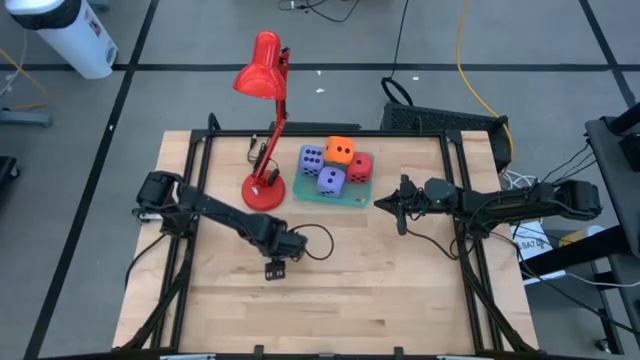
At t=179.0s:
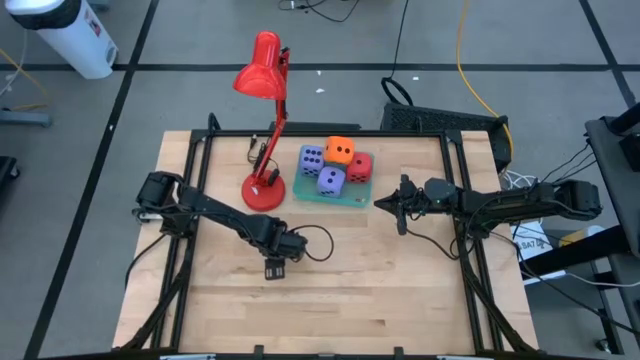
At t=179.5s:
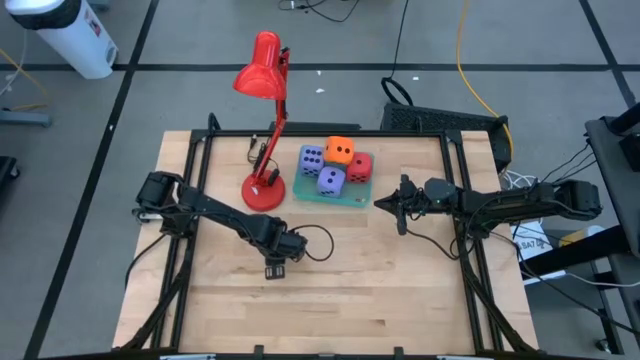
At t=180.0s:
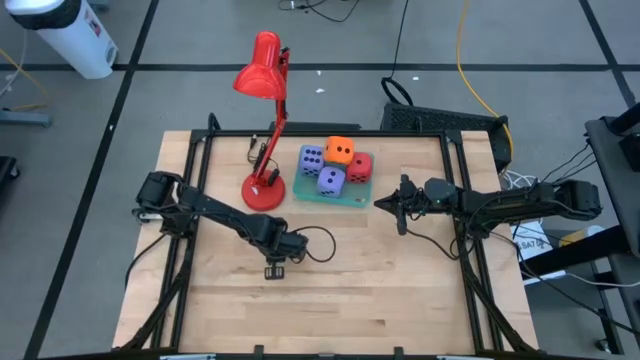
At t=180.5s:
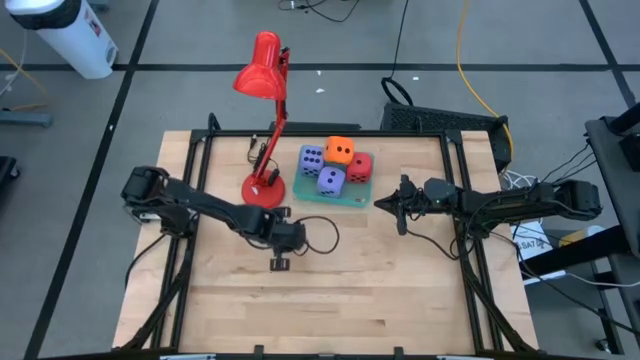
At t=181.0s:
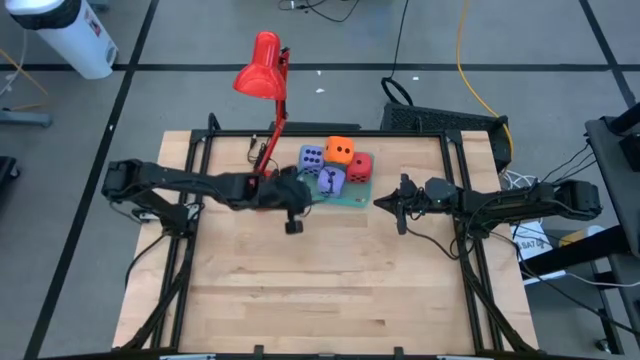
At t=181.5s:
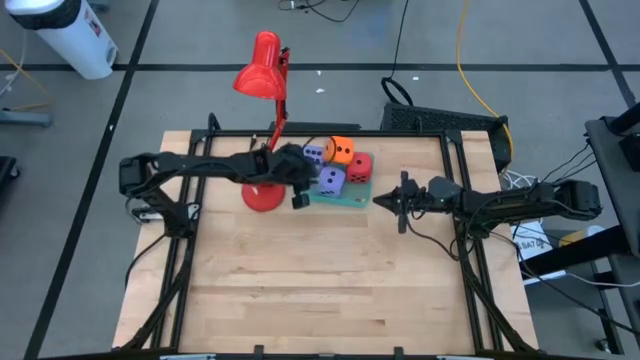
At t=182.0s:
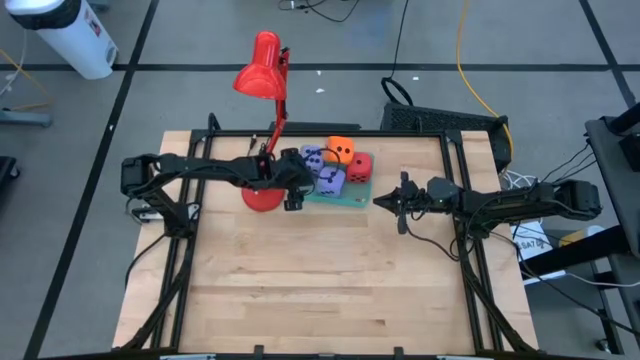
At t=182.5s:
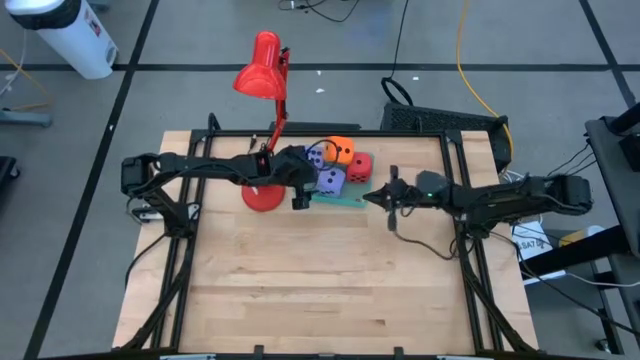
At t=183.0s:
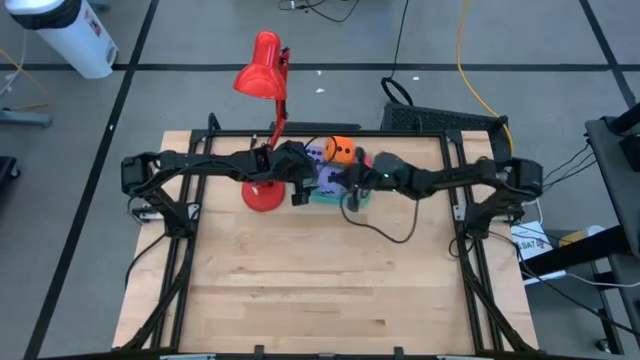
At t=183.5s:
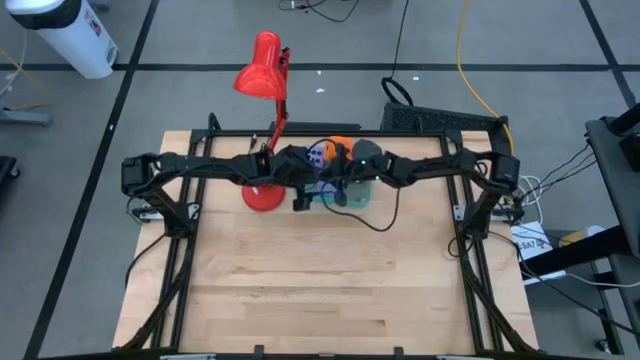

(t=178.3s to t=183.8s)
Task: Pick & Place Dice
Put the small light green die into the blue bin

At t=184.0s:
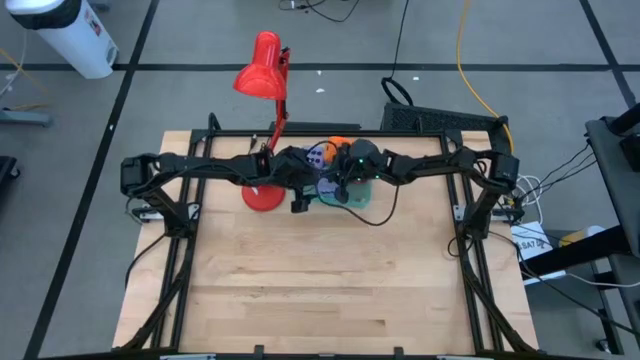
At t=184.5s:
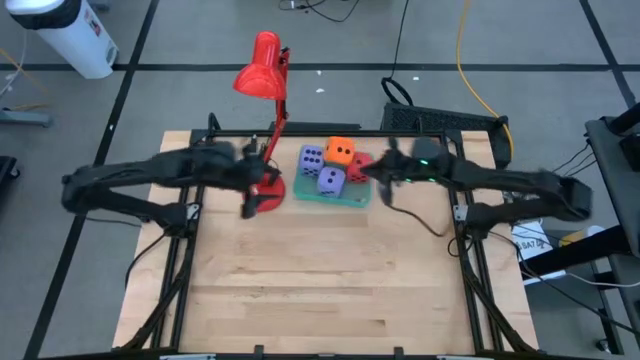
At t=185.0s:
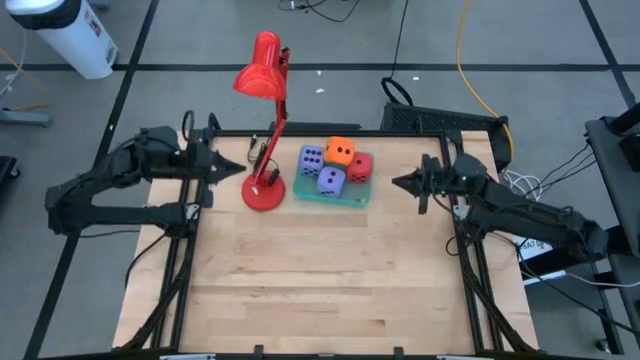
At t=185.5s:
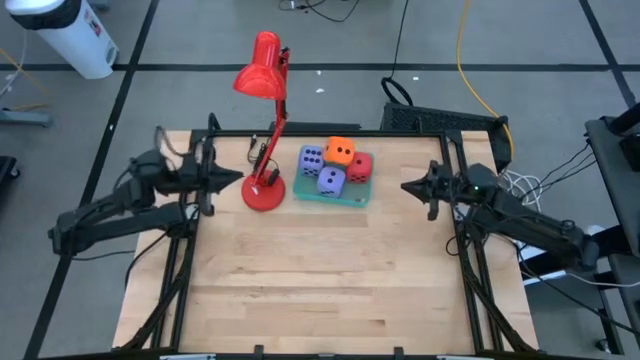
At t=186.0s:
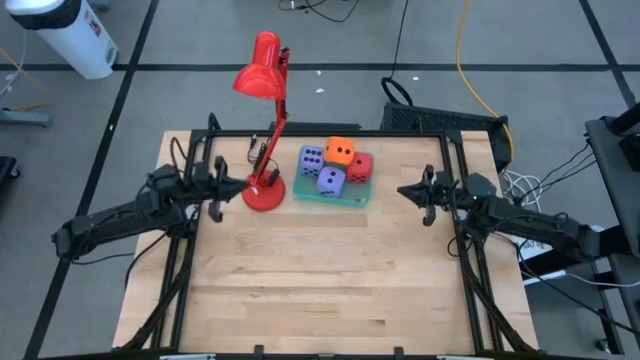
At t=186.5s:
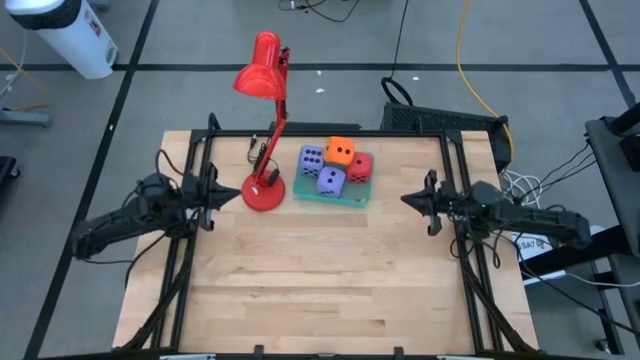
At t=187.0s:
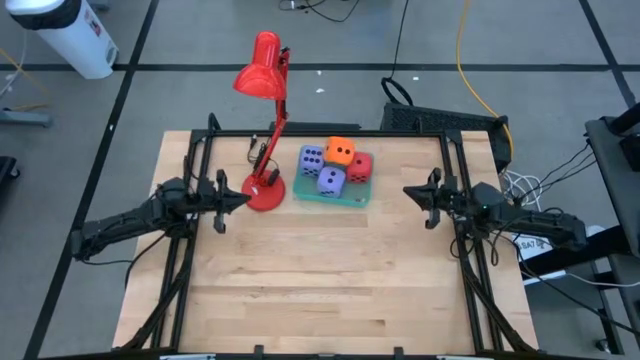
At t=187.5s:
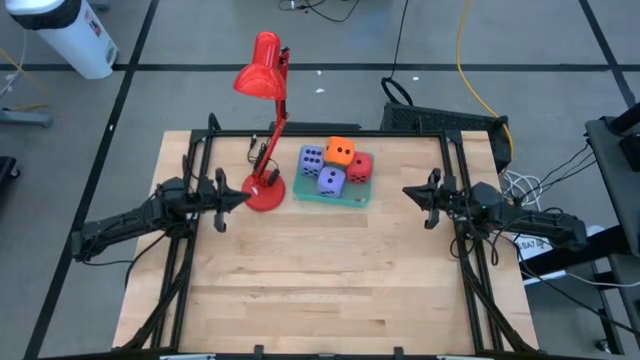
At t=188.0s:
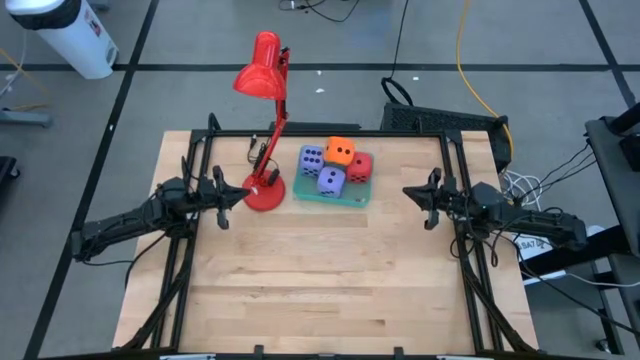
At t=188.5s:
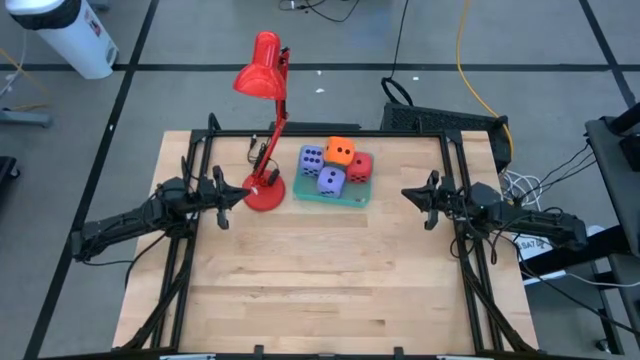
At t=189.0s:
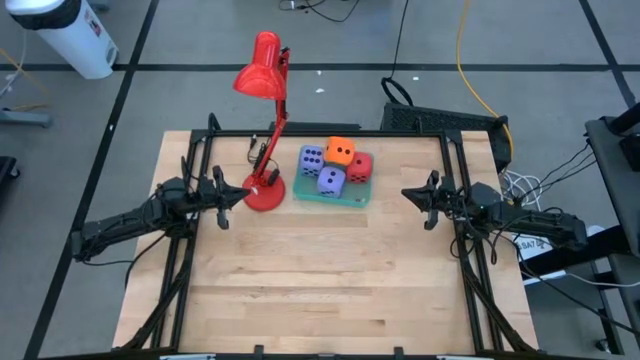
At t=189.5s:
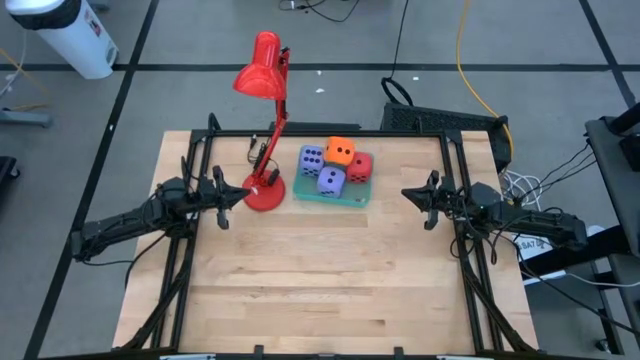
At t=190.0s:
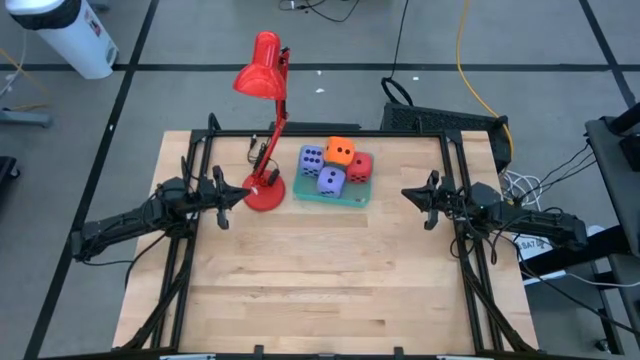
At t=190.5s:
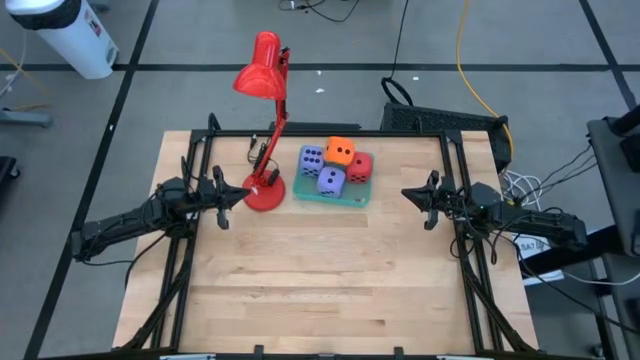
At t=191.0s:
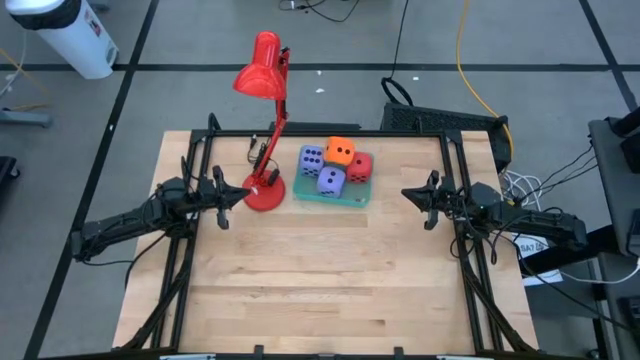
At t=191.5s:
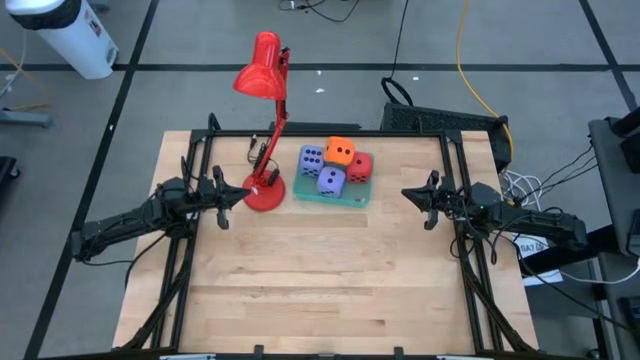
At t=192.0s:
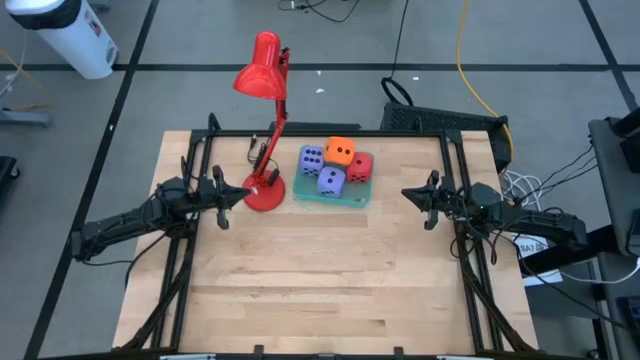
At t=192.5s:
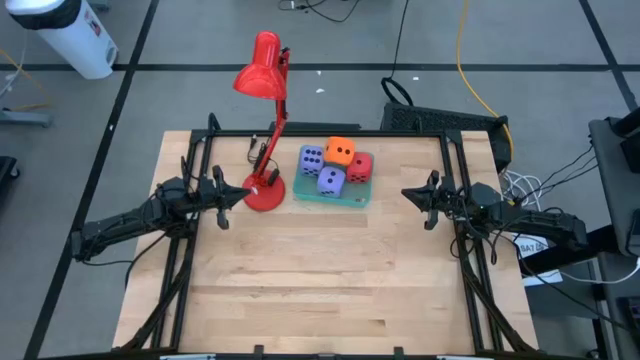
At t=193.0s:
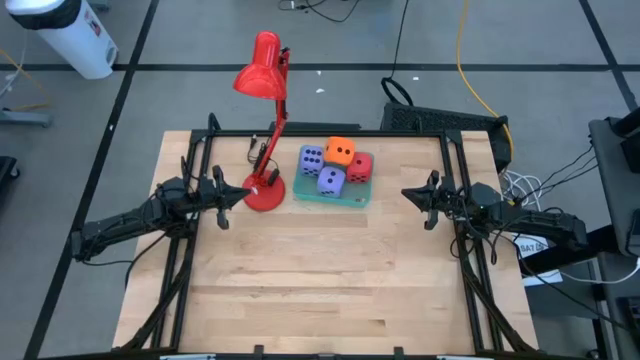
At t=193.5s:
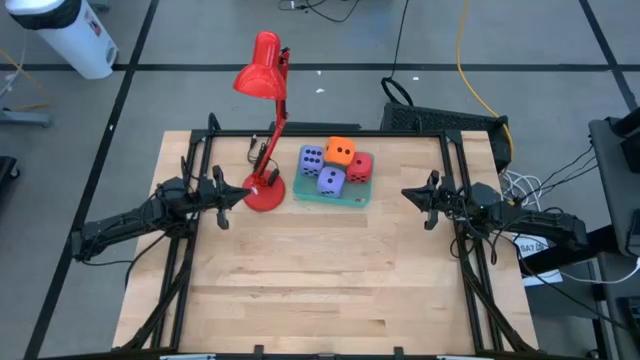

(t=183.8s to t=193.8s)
Return to Home Position

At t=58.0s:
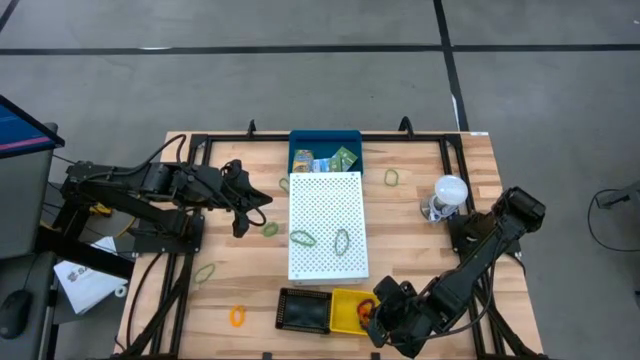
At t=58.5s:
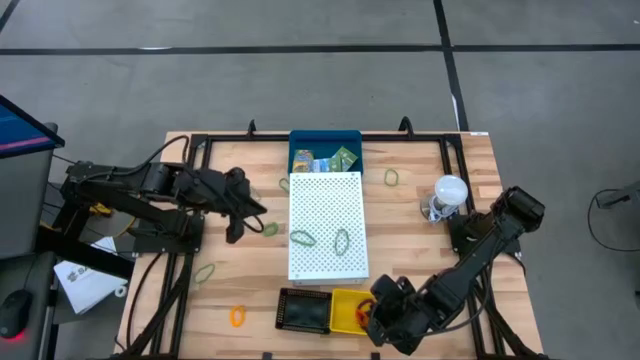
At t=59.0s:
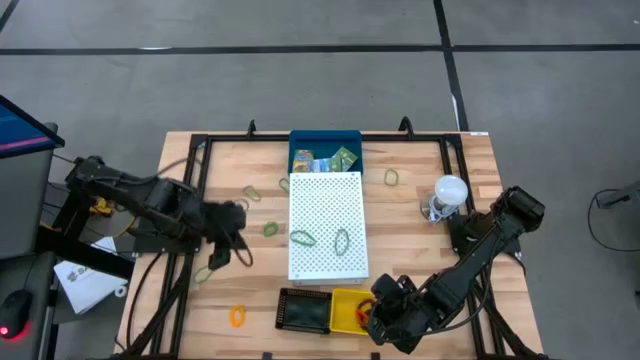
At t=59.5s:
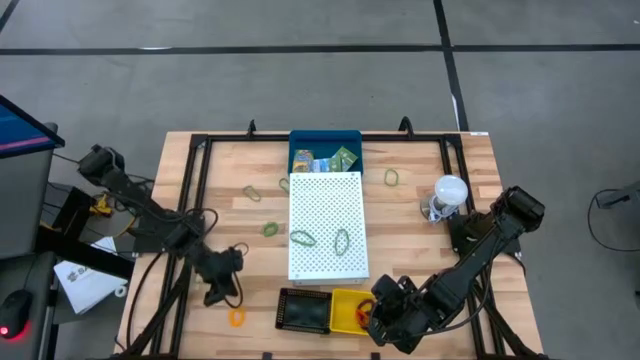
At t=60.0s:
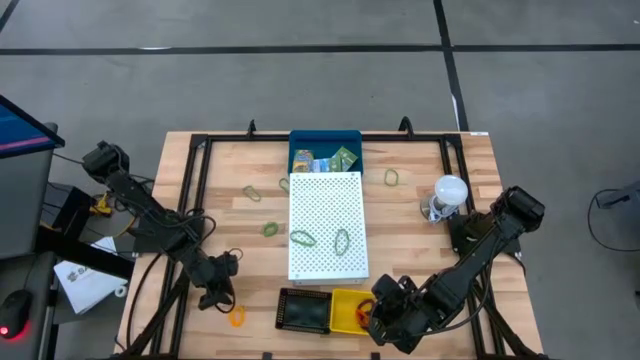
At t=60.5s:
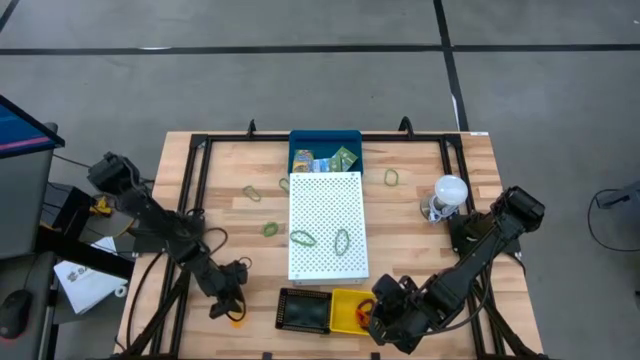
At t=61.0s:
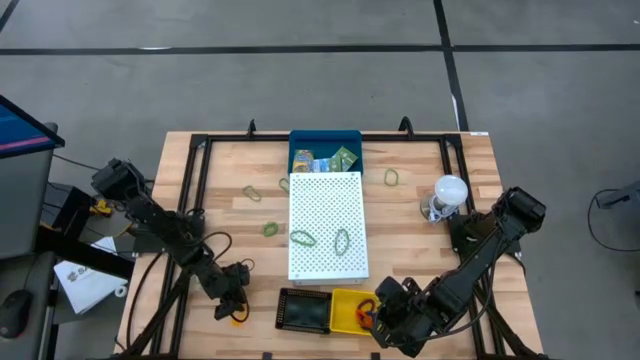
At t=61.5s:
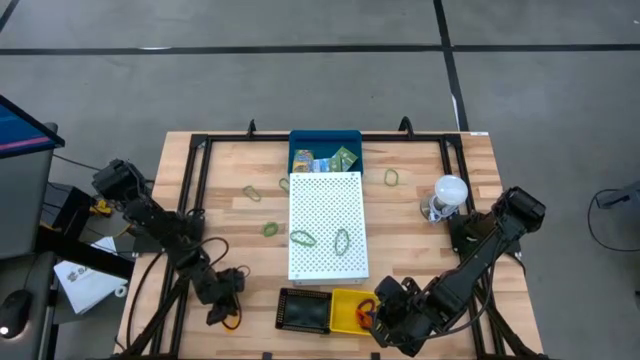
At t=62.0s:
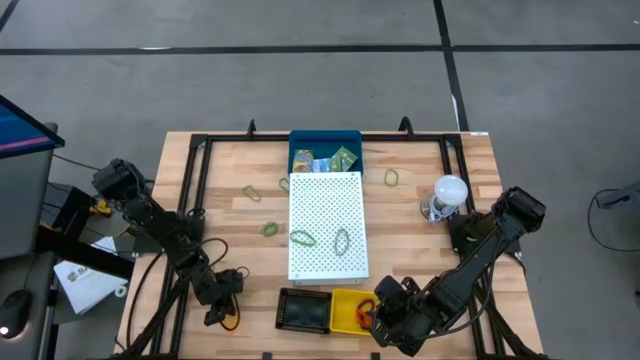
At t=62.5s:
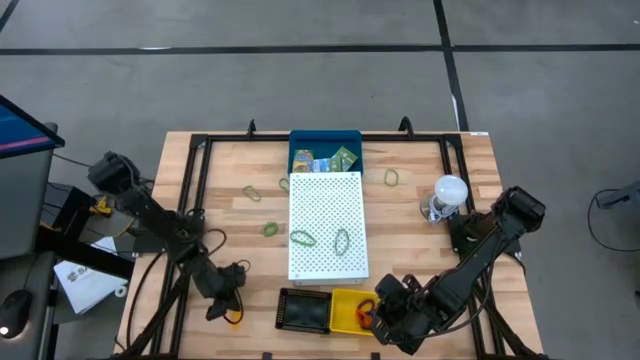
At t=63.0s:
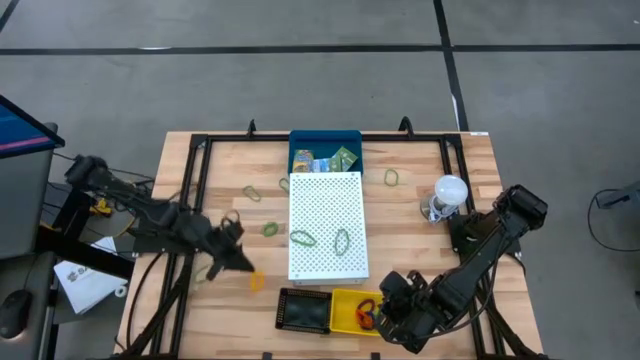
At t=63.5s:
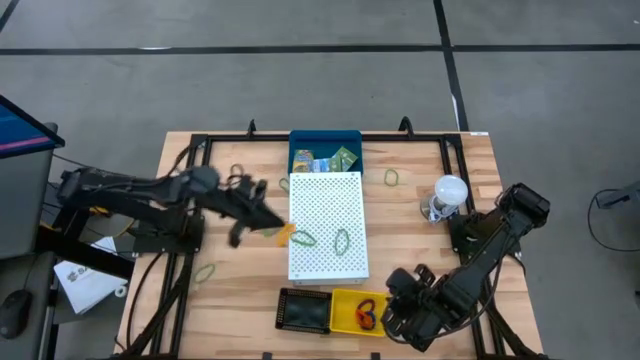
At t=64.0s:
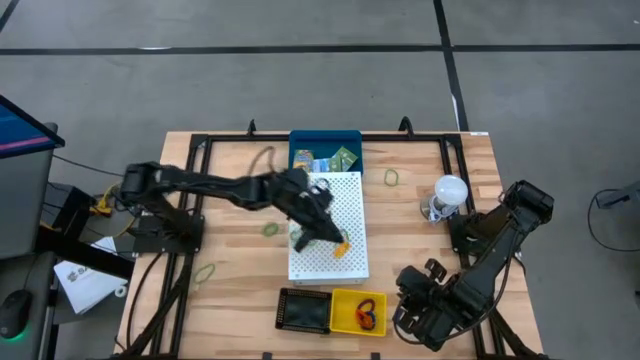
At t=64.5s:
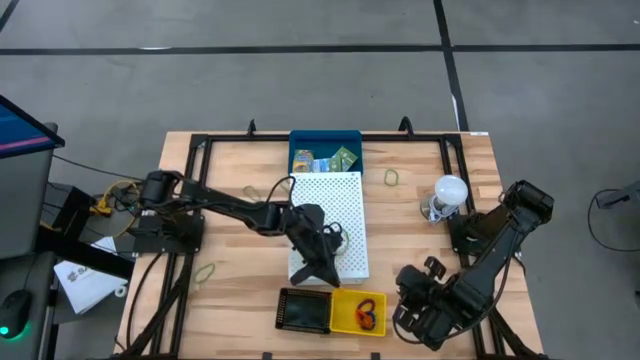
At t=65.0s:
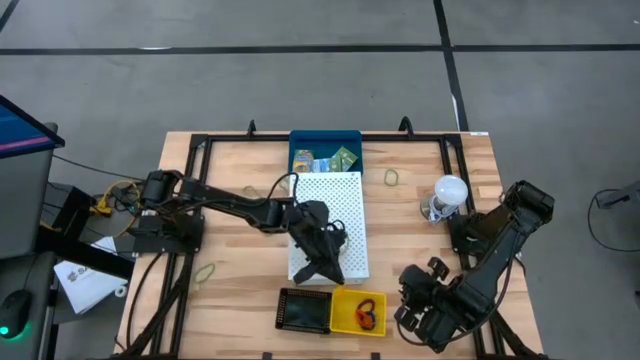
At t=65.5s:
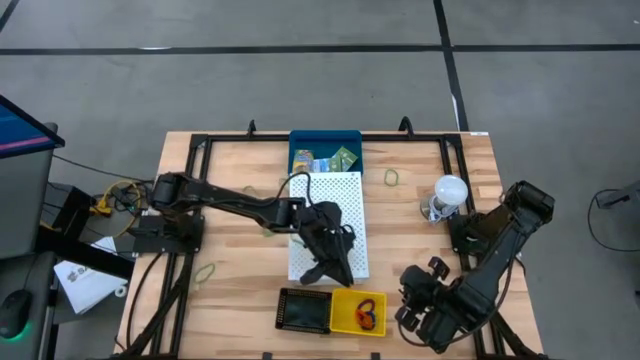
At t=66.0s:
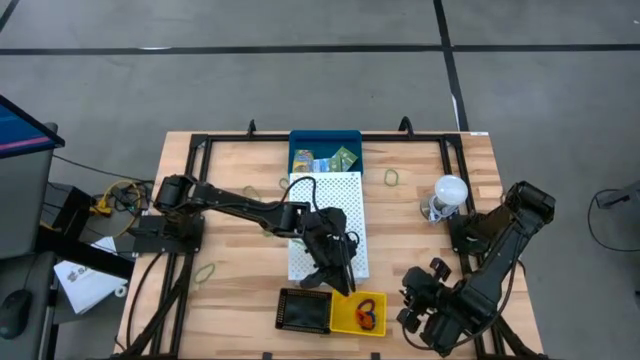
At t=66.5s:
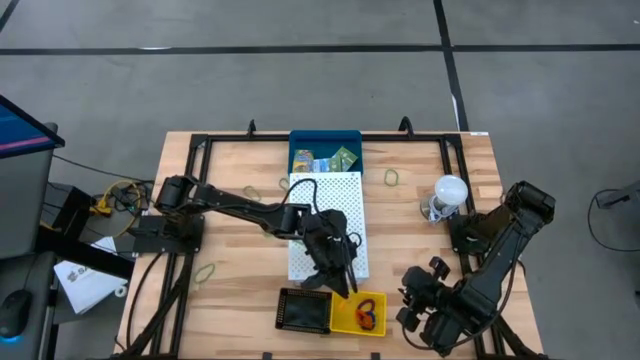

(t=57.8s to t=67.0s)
Task: Pick & Place Office Desk Supplies
Put the yellow spring keychain into the yellow bin
